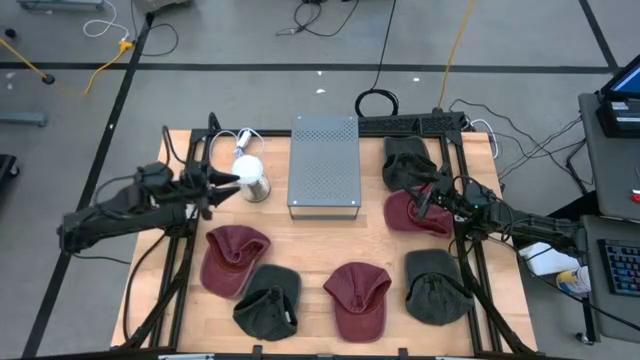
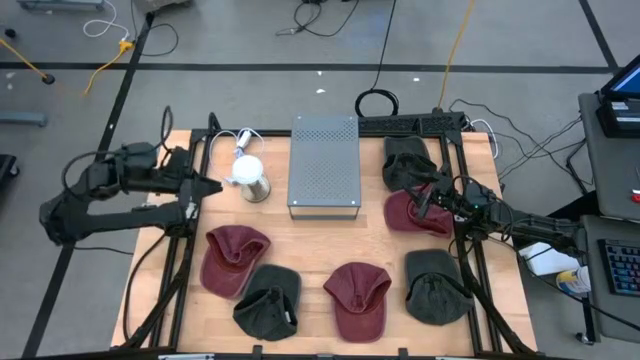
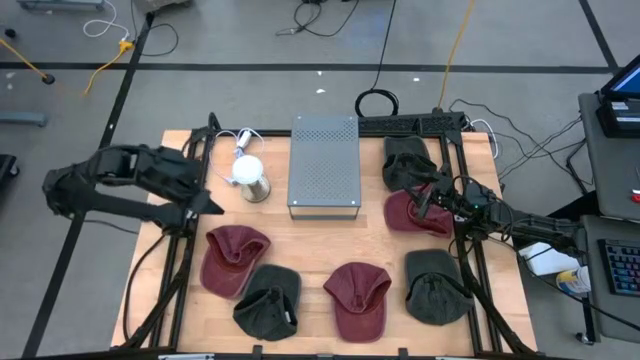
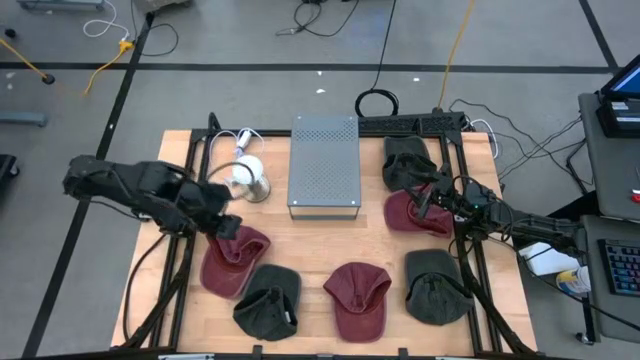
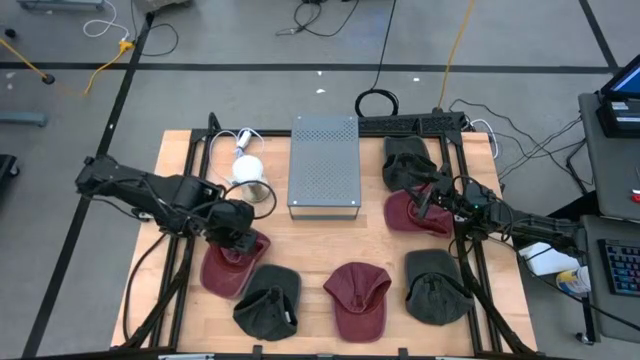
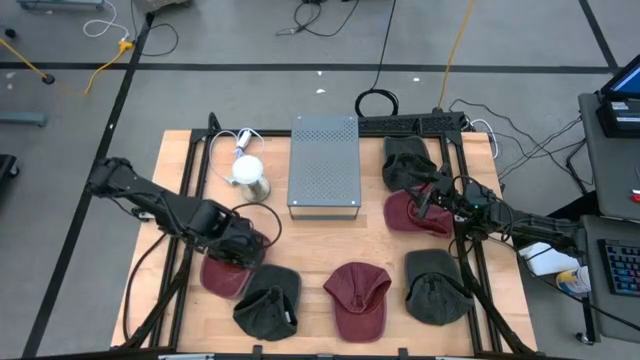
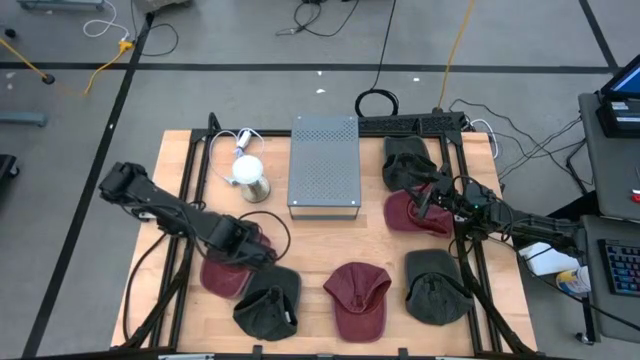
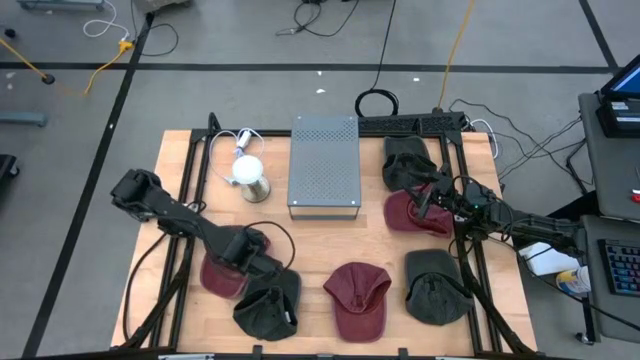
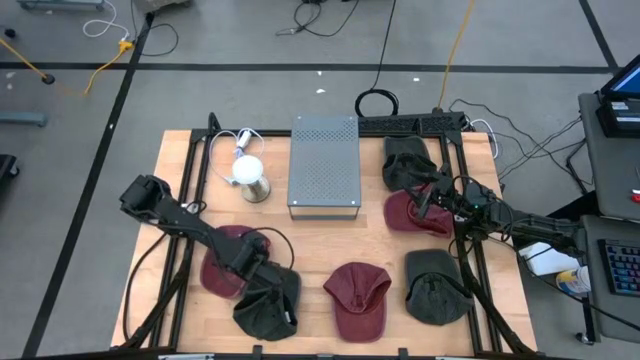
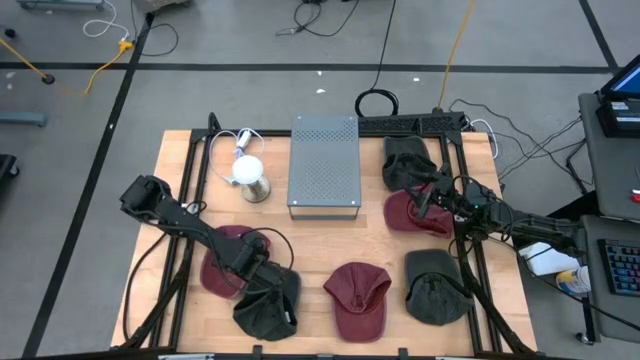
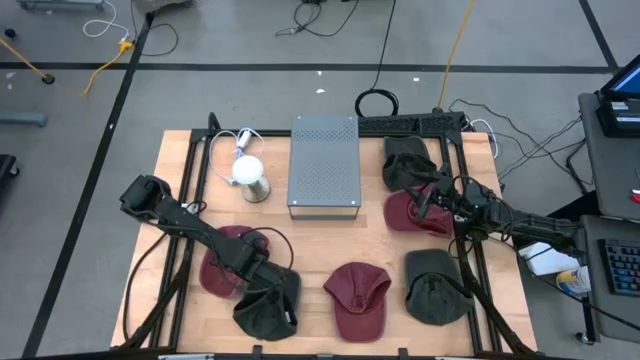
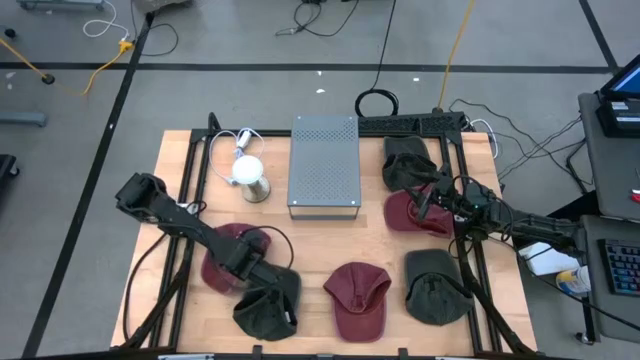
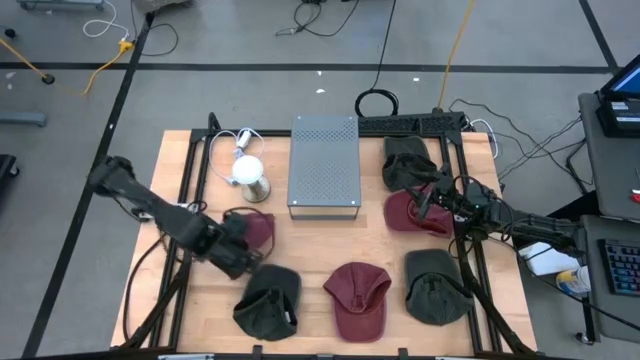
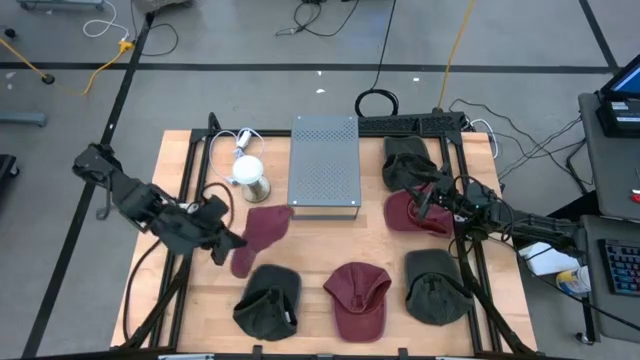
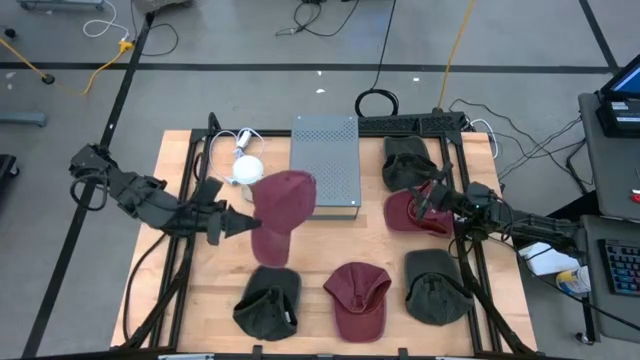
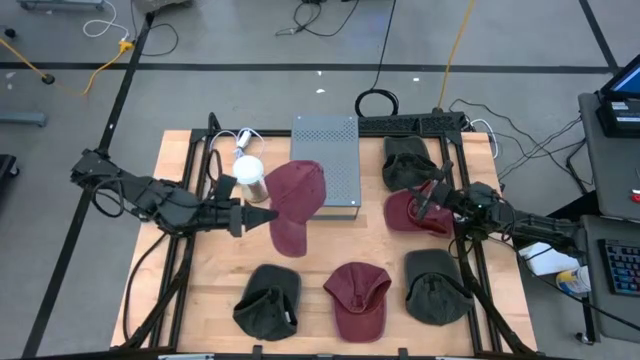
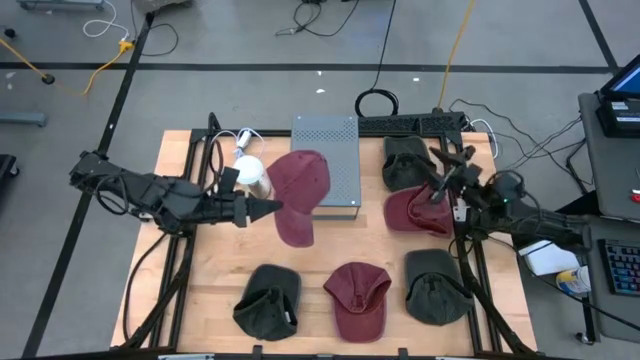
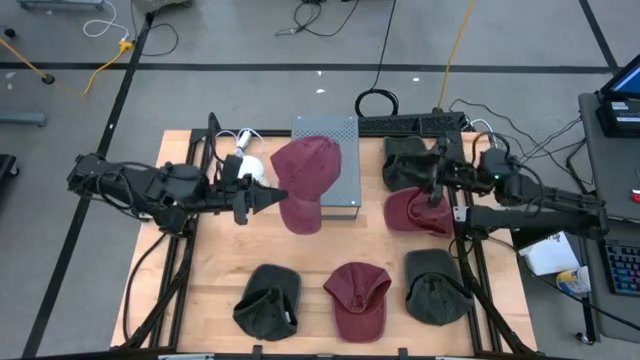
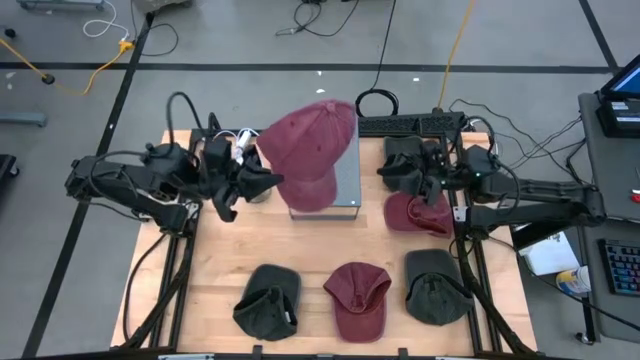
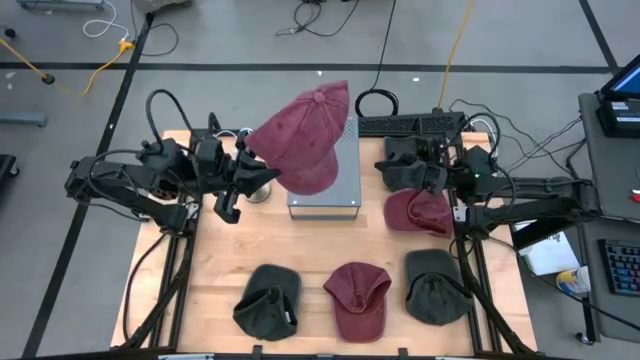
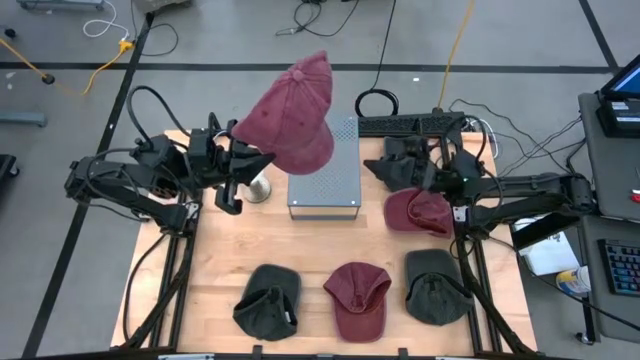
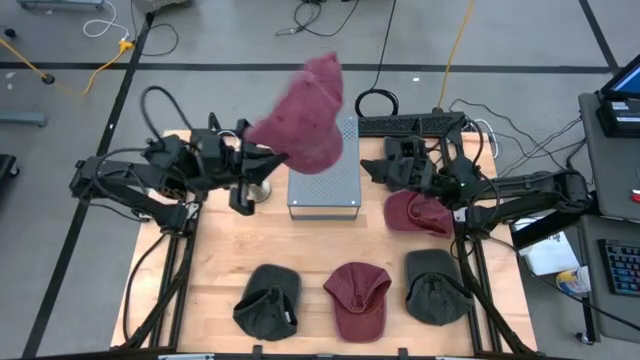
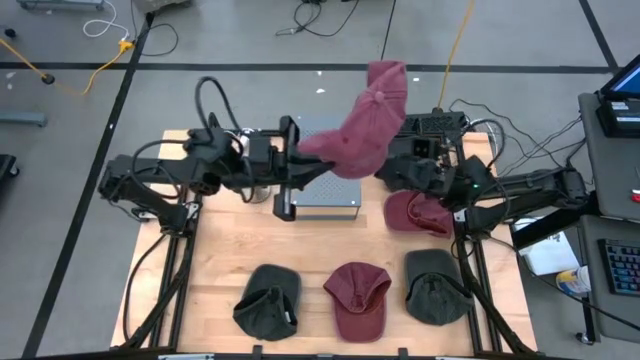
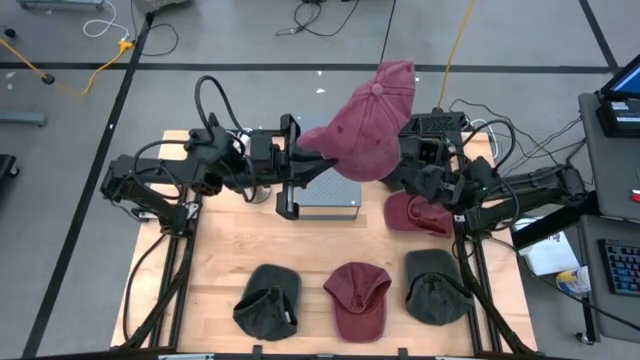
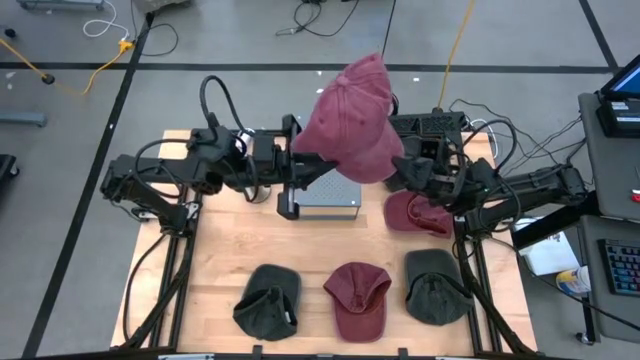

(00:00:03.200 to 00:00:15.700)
Task: Pick & Place hat
Put the left red cap on the shelf
